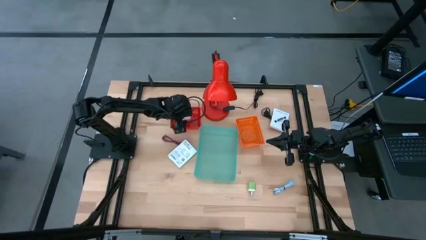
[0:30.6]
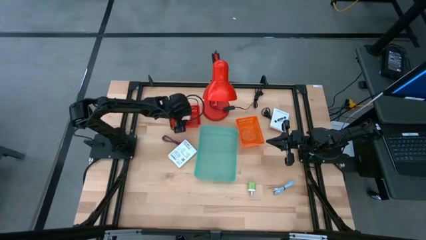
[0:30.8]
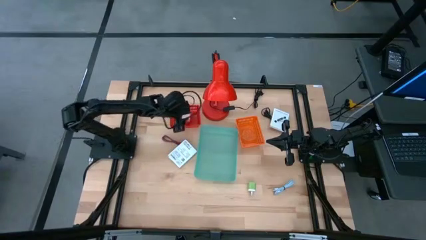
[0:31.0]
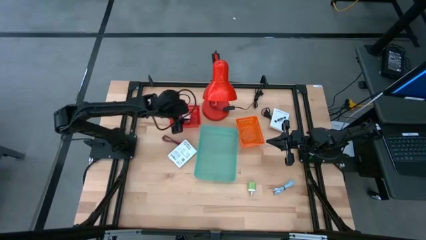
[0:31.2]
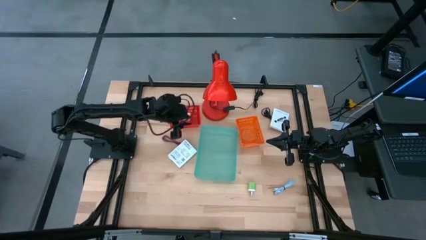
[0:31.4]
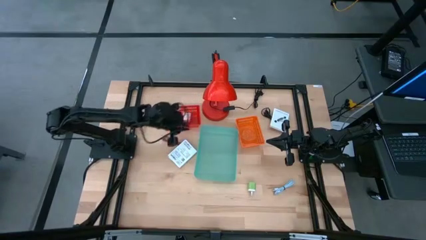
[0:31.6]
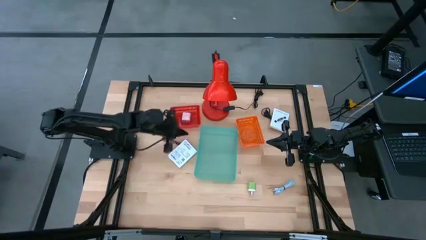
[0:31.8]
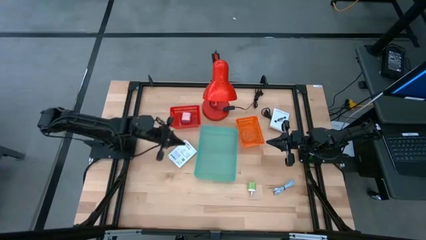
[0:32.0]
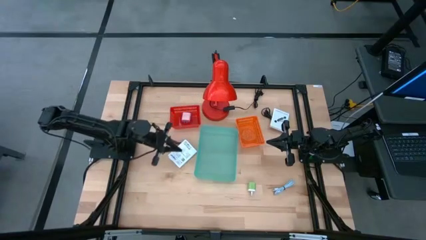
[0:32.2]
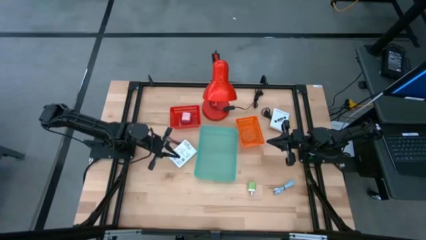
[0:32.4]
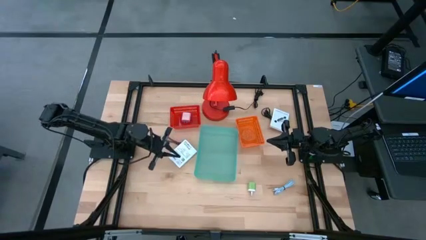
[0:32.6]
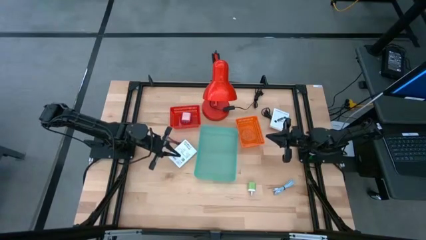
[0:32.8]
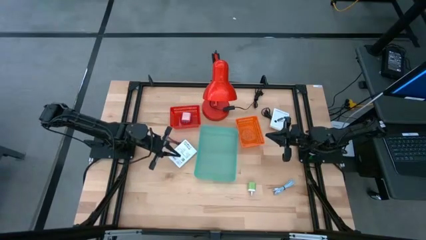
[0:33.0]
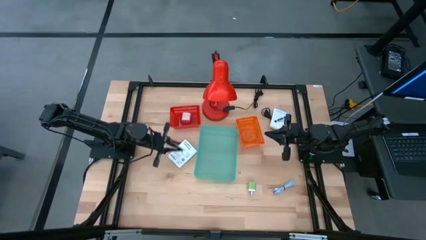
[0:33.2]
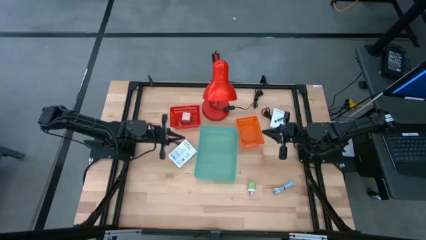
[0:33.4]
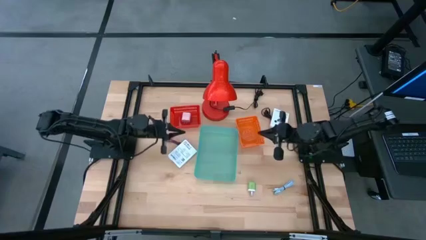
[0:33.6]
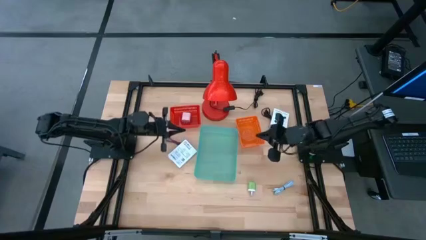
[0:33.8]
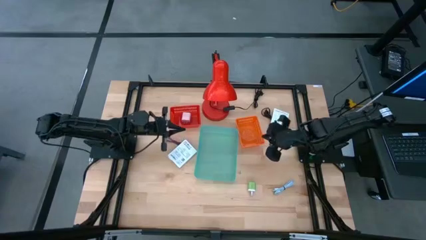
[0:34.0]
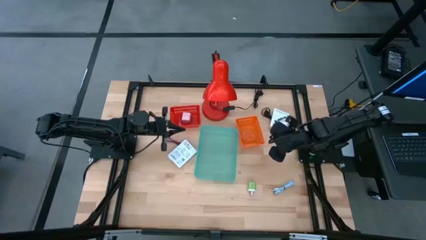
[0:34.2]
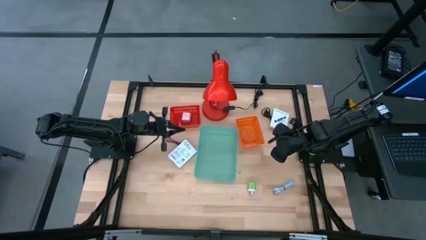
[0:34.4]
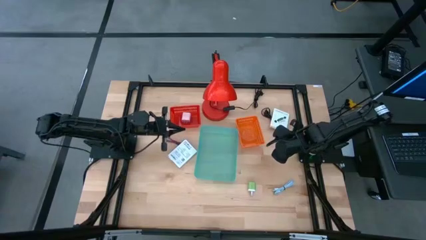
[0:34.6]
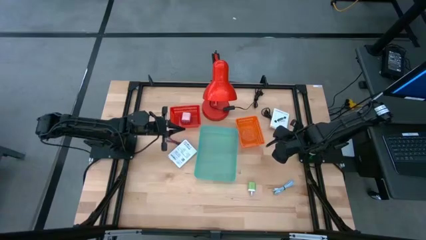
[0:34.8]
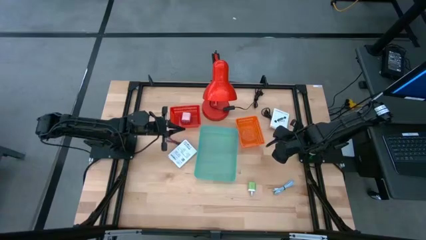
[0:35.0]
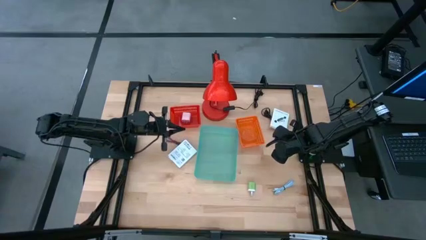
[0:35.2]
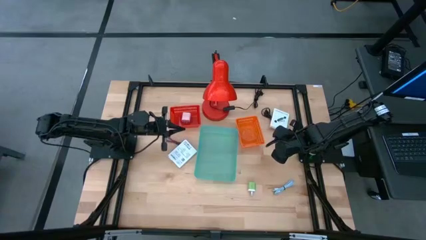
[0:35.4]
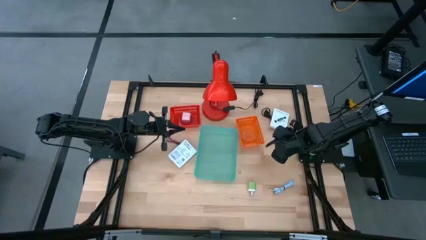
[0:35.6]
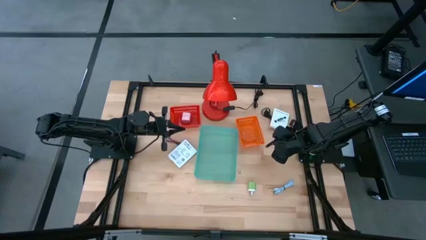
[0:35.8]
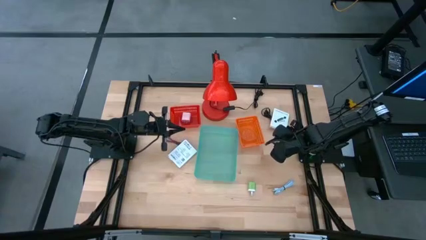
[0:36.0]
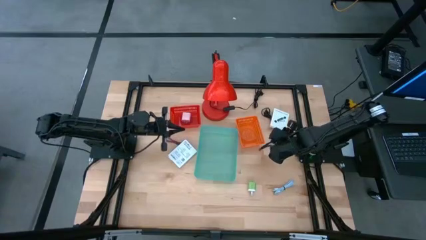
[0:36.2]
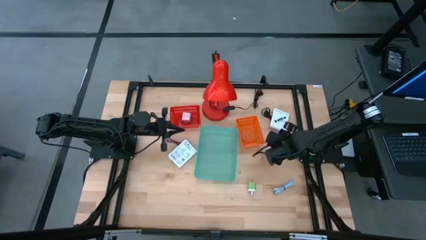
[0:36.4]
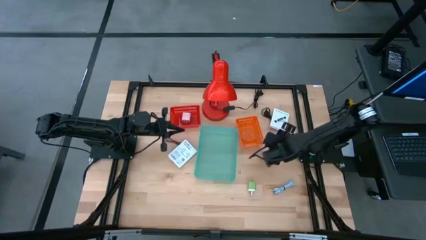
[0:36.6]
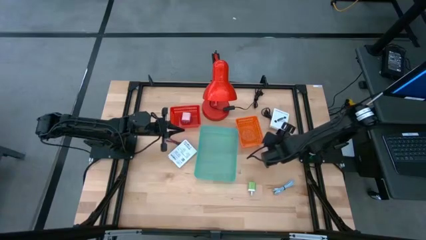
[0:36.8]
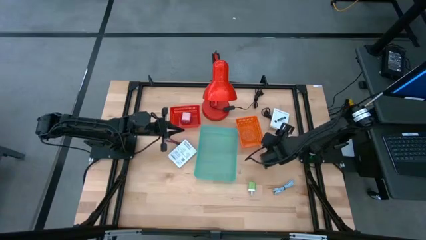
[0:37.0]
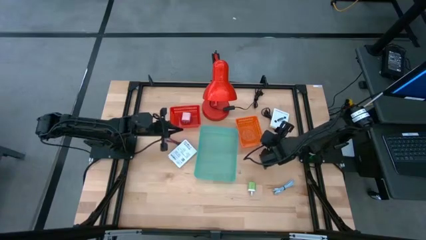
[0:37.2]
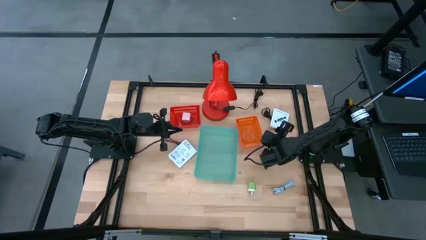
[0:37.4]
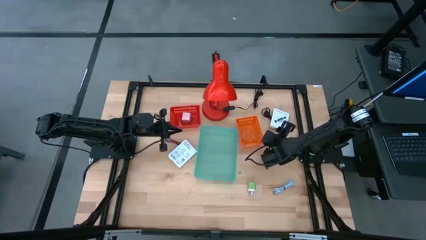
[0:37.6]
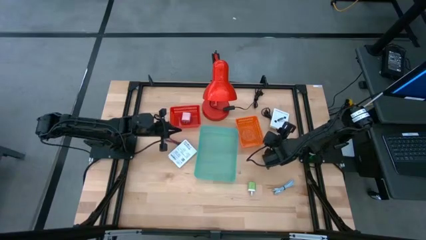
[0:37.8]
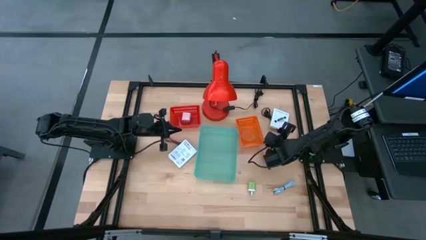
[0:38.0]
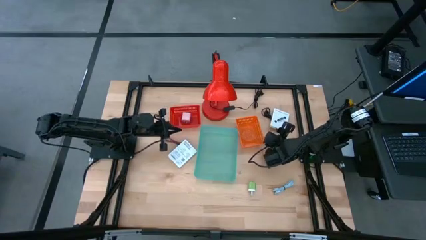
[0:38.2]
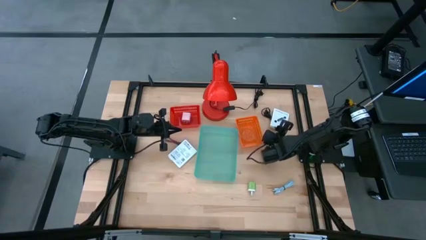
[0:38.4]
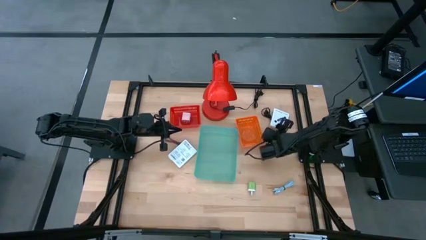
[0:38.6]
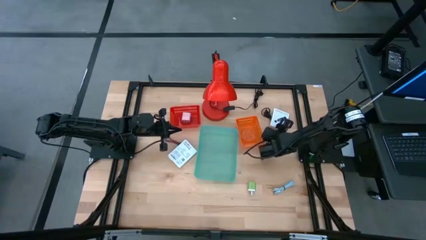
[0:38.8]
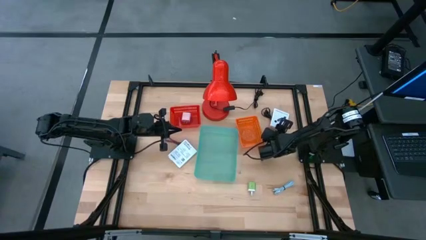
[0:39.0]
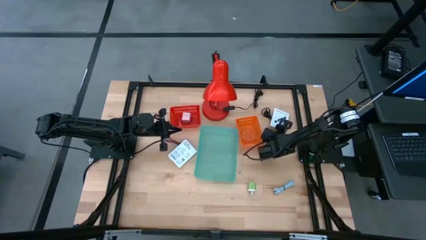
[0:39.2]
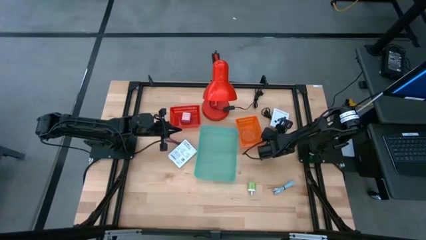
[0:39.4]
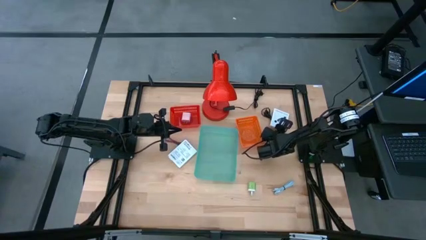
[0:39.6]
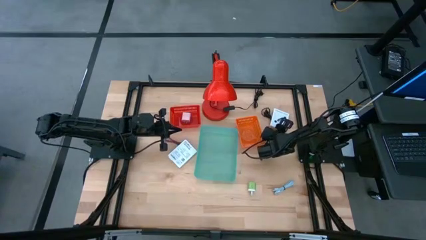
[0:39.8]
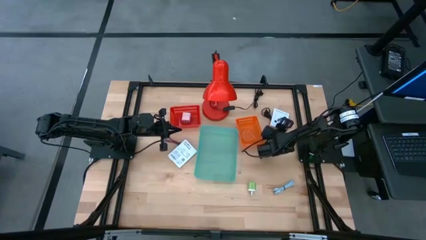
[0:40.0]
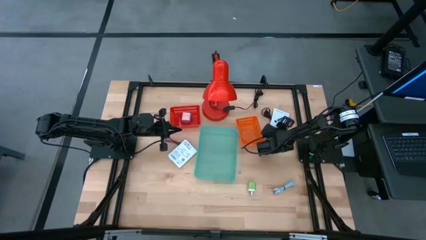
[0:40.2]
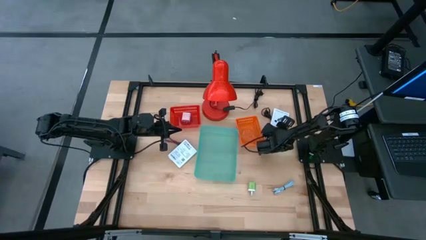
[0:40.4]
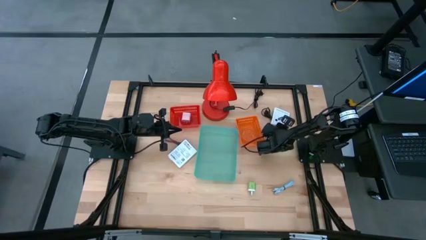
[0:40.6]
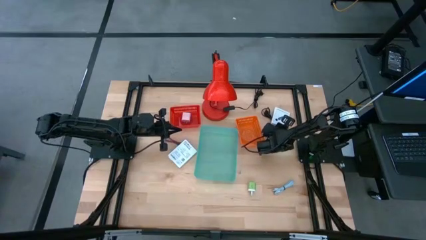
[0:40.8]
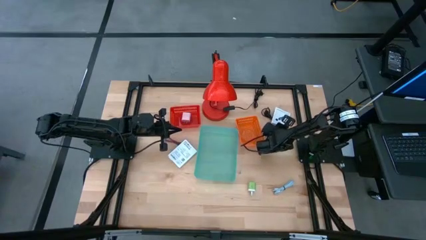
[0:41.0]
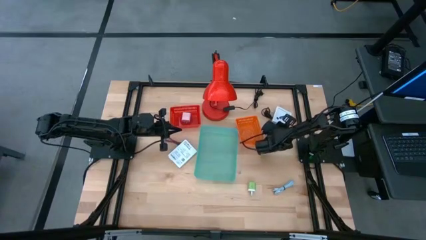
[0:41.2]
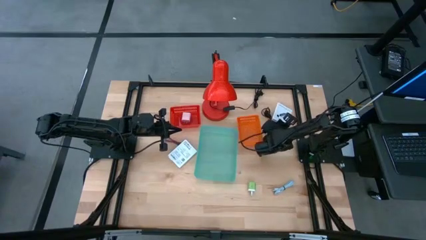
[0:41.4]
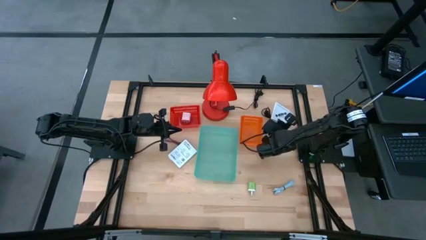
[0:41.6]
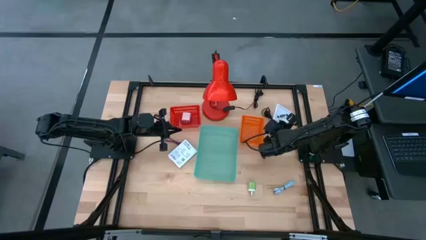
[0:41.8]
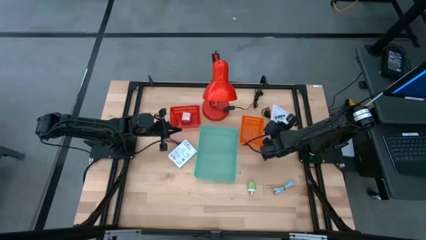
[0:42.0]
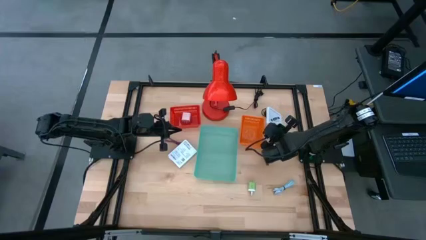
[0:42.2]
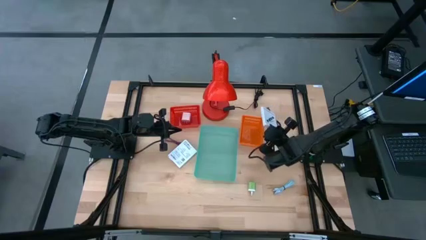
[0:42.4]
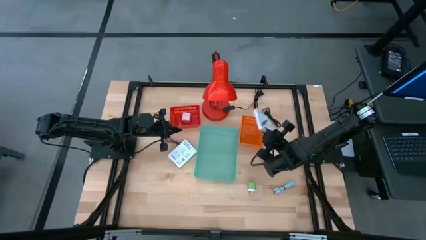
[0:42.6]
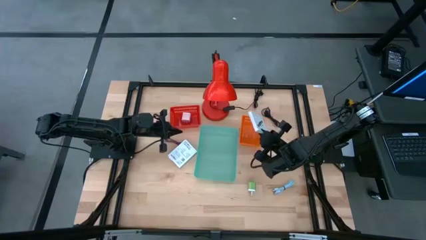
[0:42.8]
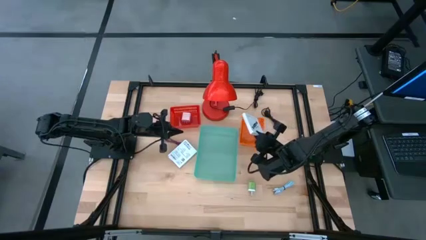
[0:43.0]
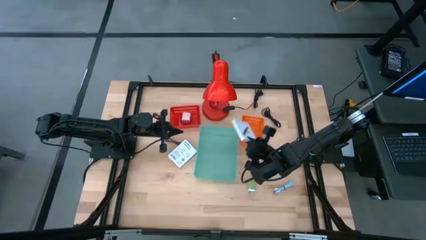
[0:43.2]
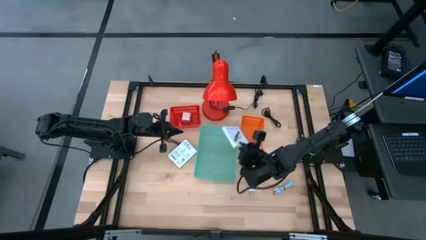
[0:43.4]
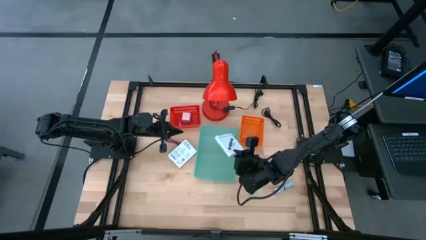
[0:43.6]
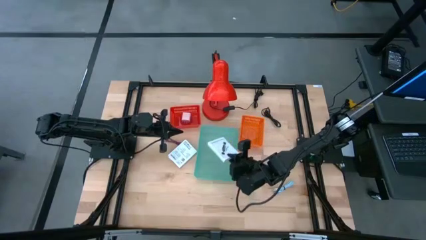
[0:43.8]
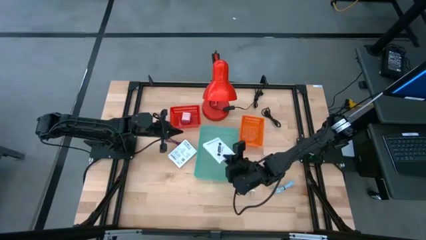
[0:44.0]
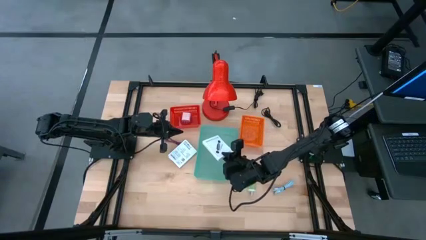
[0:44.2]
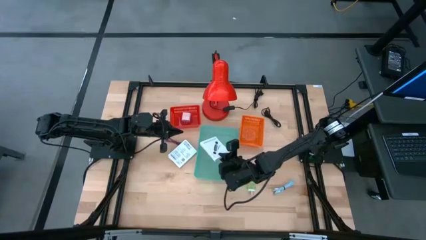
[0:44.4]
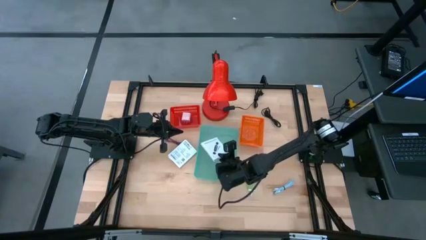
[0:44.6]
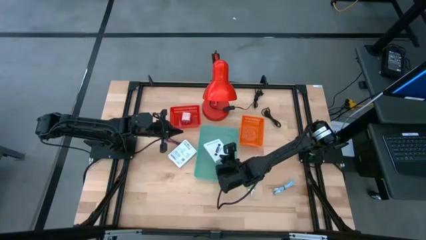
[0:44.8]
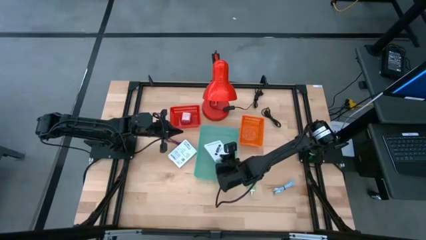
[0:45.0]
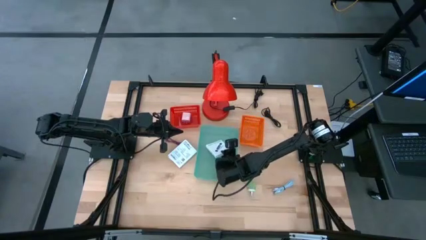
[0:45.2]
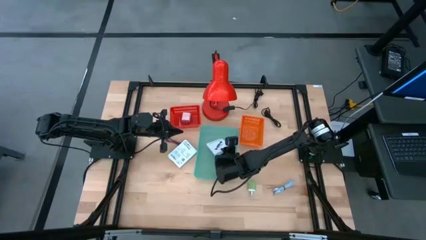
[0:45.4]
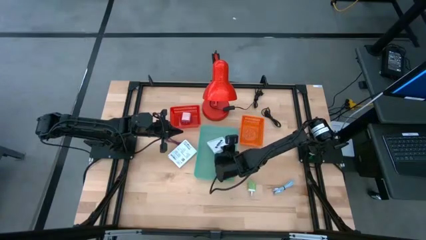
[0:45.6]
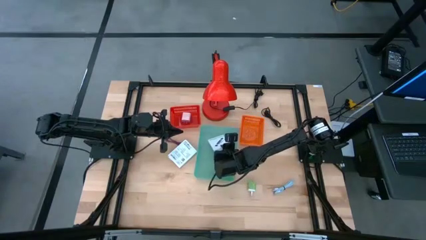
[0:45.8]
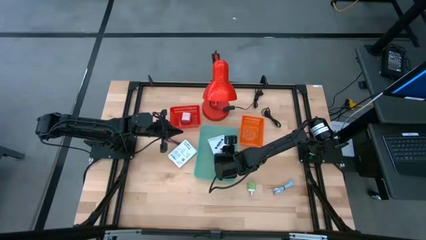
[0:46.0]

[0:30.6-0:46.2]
Task: Pick and place items into bin
Put the white card reader box into the green basket
